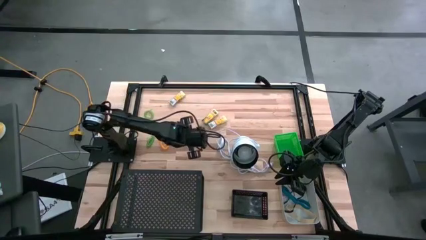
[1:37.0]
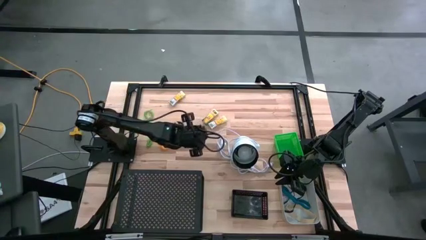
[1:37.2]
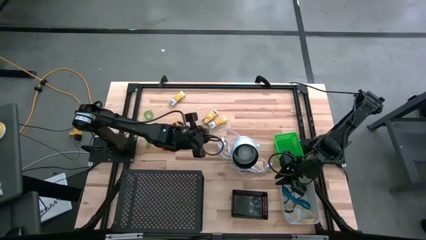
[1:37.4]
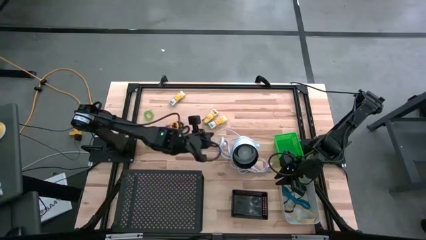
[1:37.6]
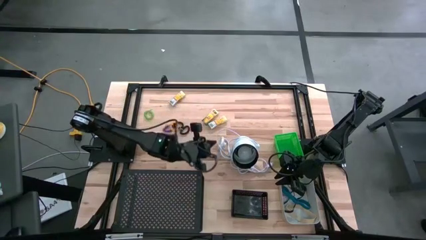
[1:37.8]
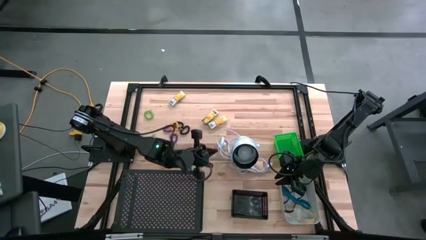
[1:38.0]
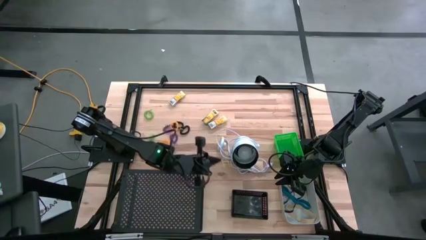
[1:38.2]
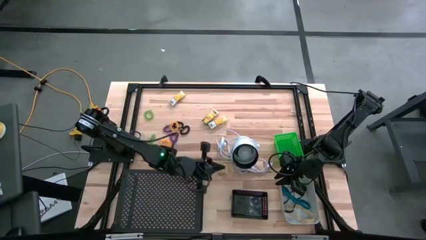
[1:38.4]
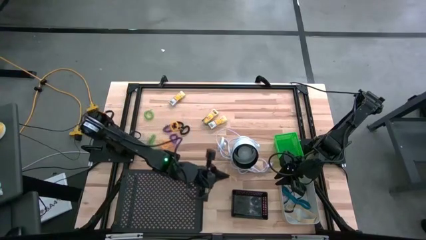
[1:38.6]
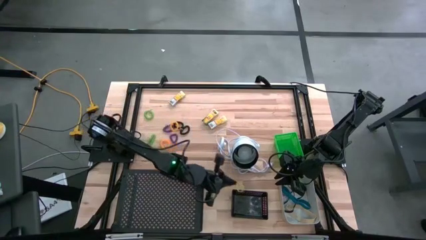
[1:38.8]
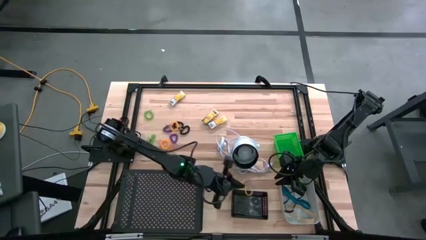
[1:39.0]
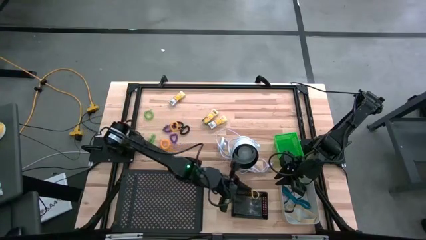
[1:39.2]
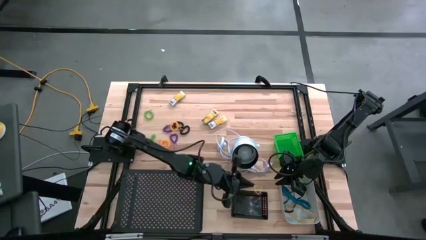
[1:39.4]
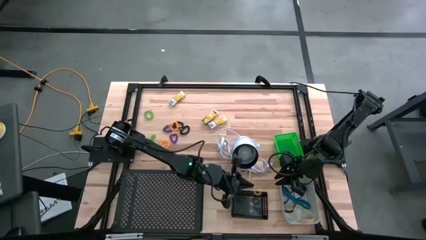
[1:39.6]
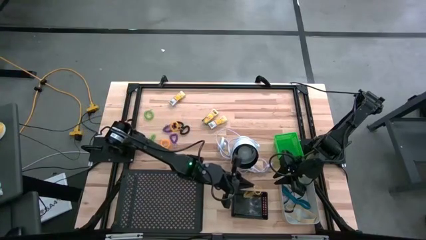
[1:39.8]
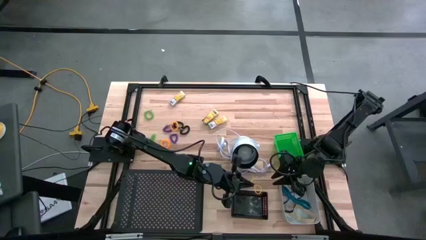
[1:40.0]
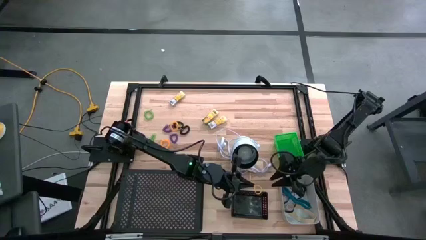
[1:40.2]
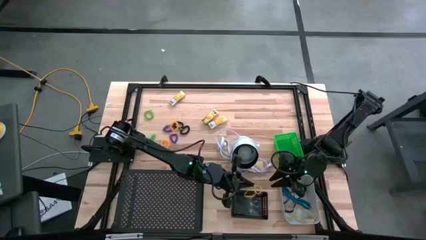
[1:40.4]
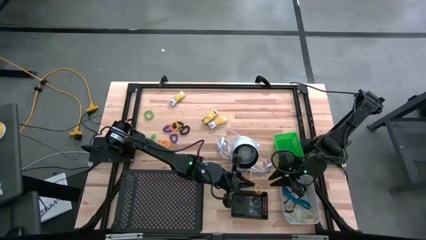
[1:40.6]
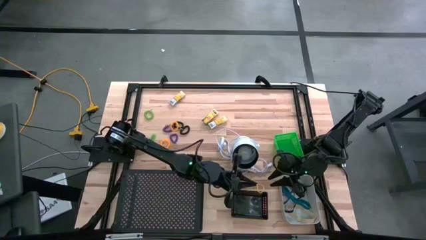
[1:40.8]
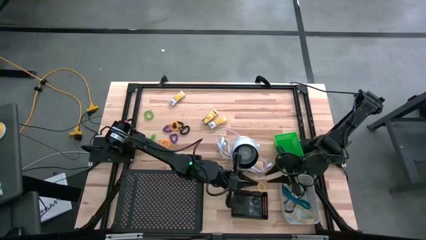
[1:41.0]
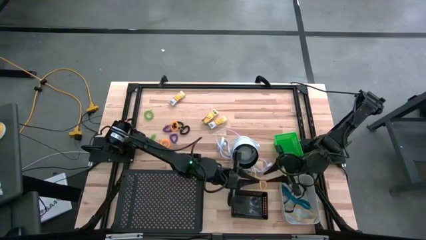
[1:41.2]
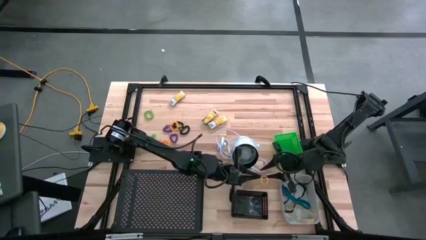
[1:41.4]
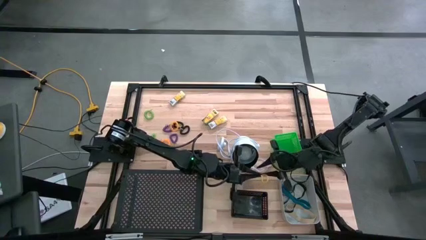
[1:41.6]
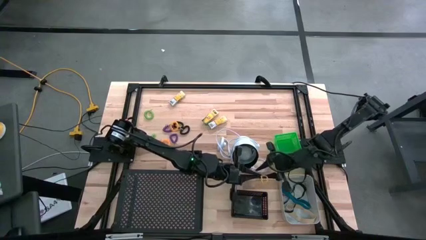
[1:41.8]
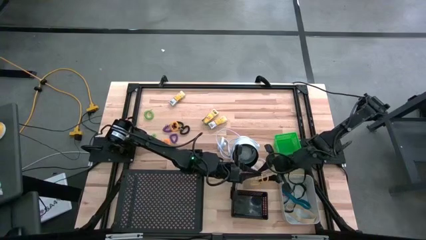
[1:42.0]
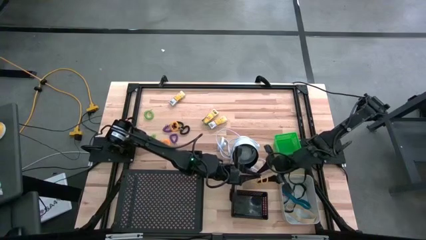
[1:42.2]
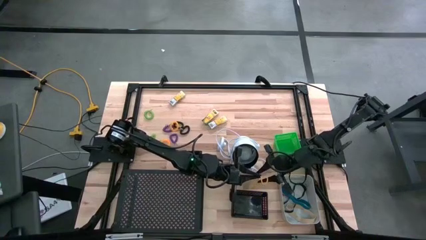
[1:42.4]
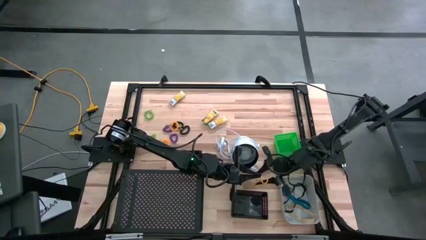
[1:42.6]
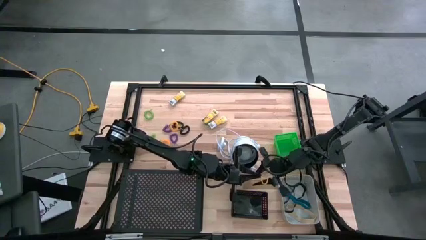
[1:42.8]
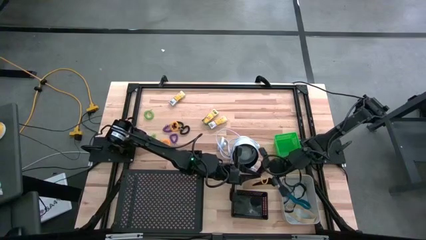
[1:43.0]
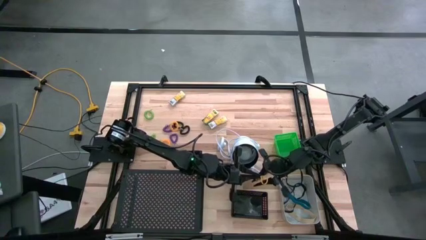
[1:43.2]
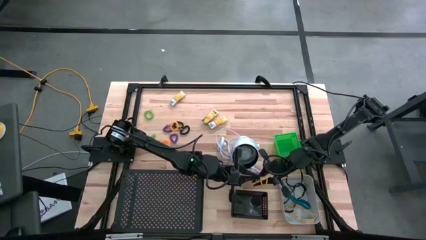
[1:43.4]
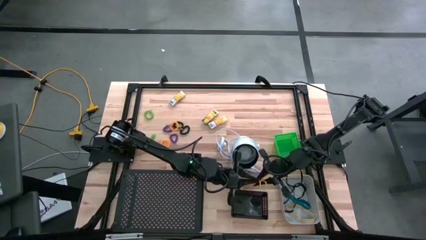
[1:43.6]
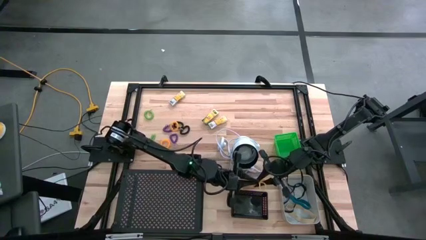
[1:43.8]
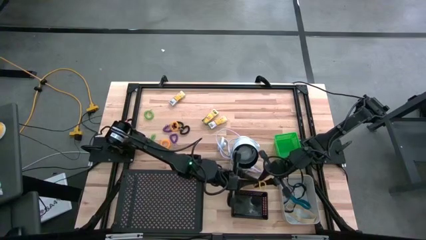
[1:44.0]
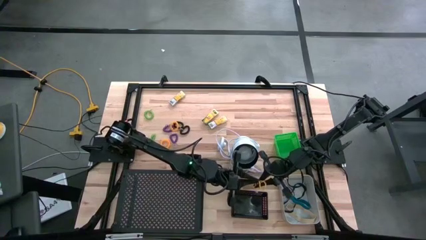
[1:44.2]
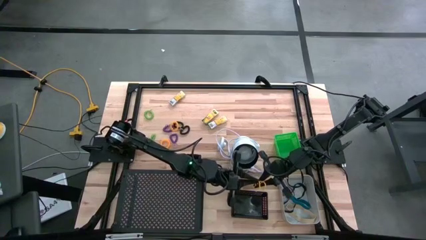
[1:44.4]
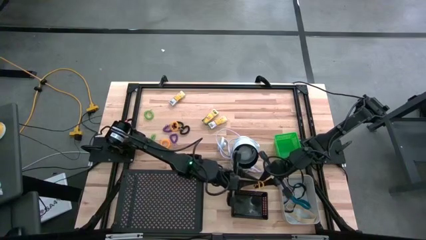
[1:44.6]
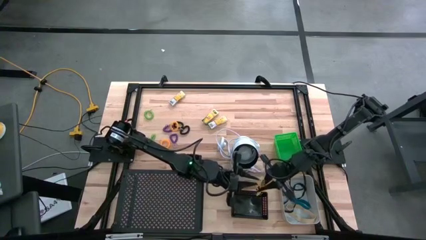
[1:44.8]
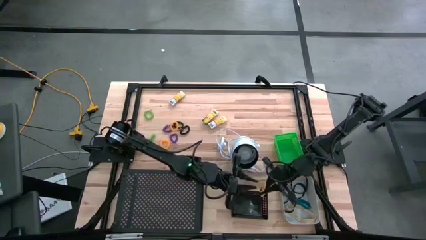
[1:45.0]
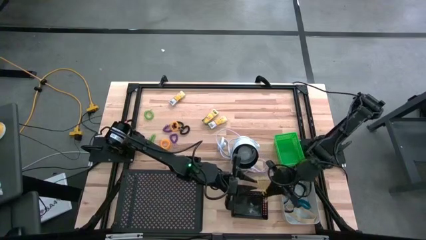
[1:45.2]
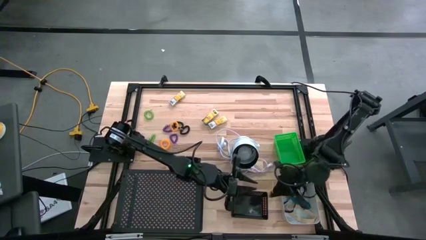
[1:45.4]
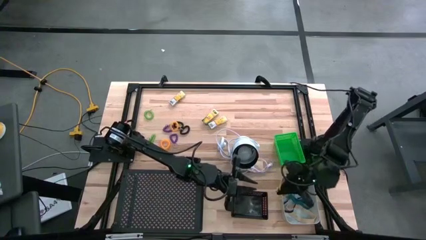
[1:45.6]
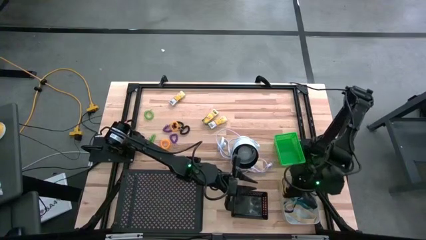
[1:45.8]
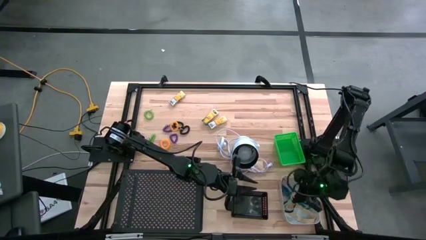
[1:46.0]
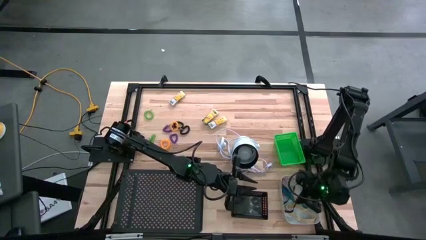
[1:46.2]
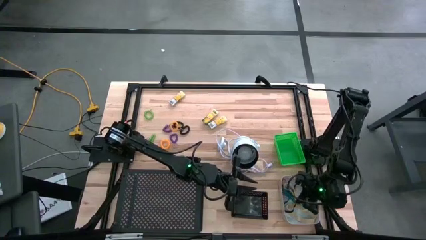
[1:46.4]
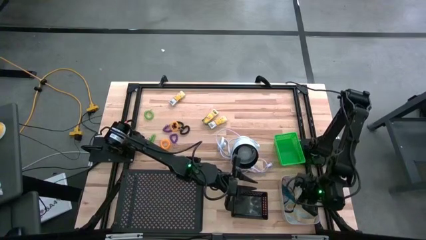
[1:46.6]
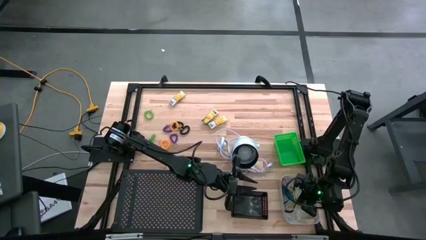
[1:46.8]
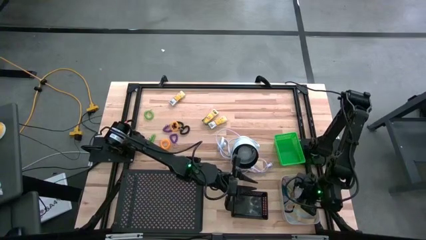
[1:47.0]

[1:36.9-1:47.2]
Task: Pick & Place Office Desk Supplies
Put the yellow rubberband into the gray bin

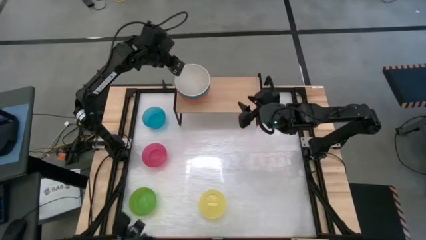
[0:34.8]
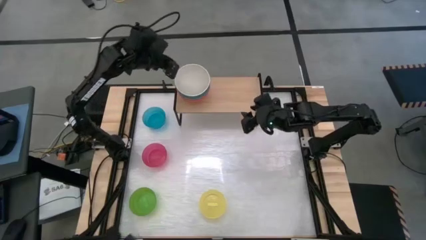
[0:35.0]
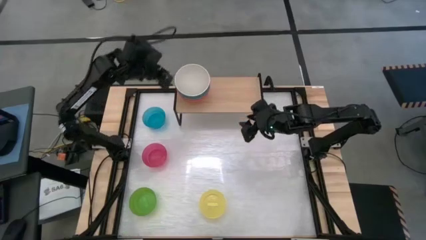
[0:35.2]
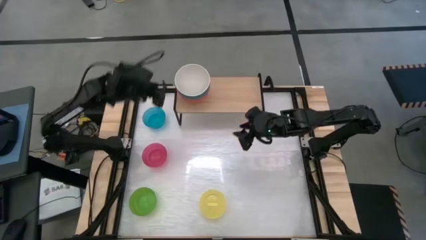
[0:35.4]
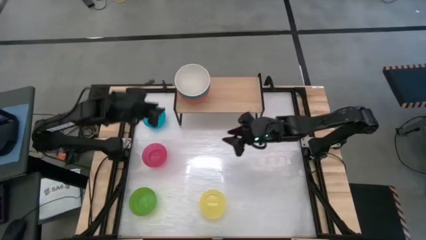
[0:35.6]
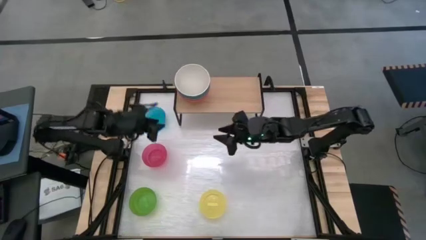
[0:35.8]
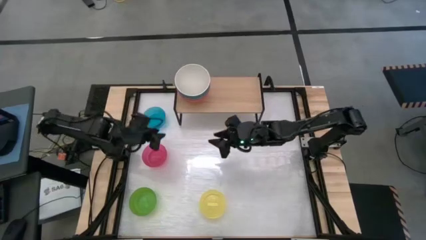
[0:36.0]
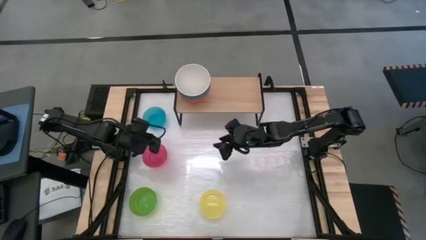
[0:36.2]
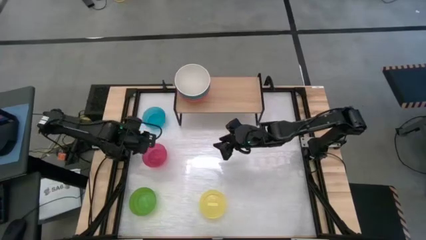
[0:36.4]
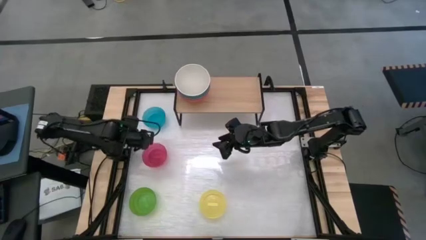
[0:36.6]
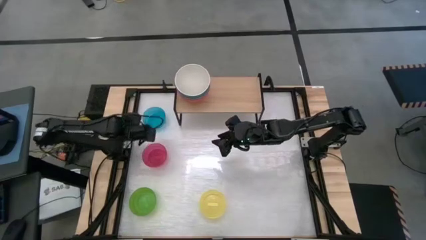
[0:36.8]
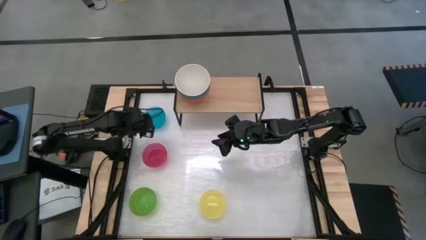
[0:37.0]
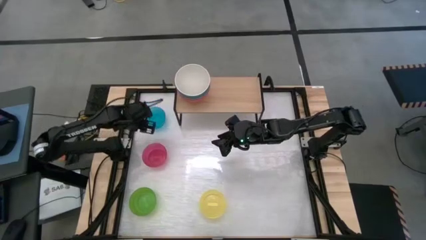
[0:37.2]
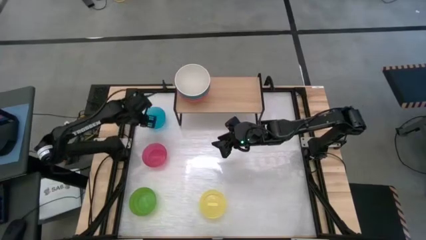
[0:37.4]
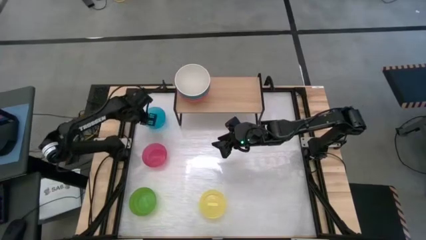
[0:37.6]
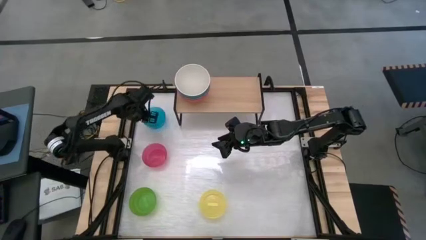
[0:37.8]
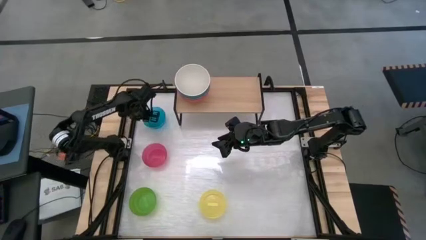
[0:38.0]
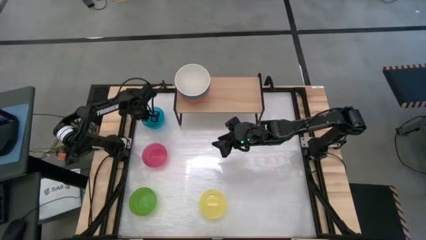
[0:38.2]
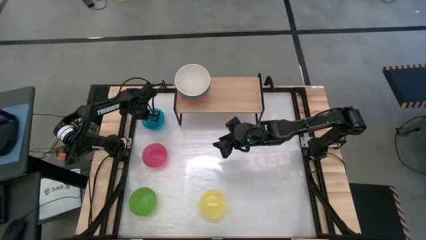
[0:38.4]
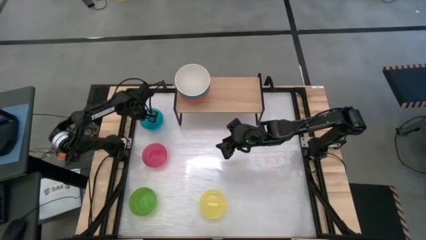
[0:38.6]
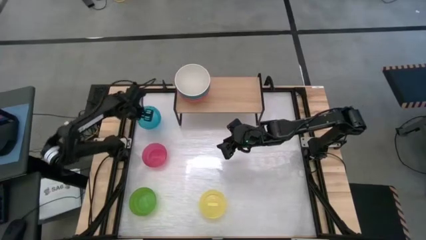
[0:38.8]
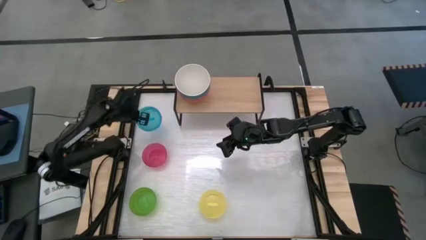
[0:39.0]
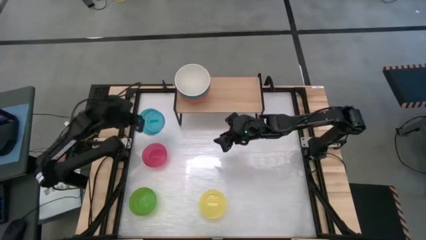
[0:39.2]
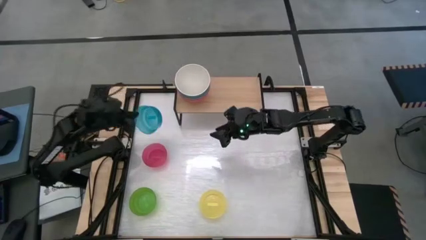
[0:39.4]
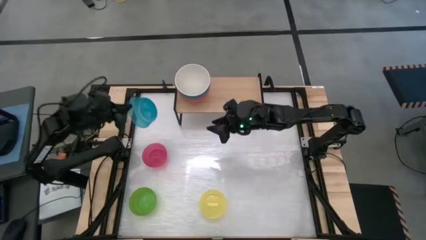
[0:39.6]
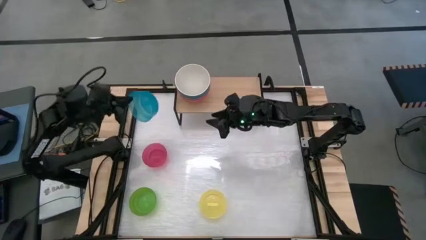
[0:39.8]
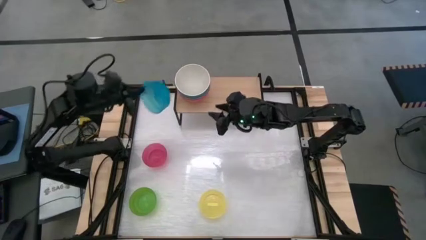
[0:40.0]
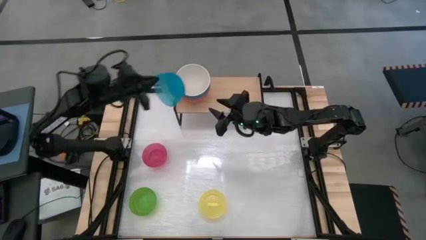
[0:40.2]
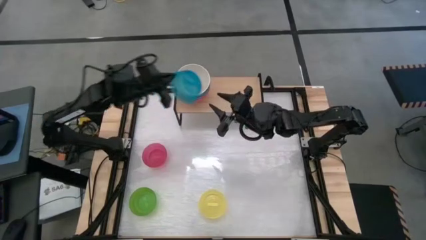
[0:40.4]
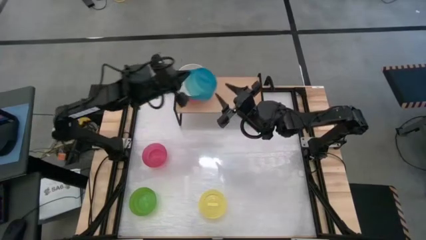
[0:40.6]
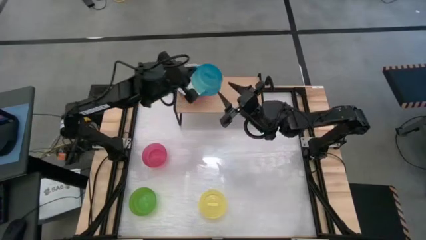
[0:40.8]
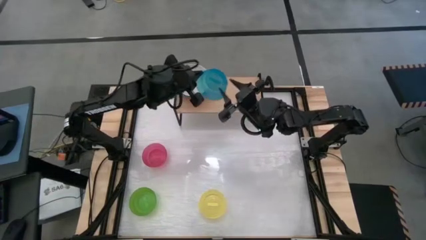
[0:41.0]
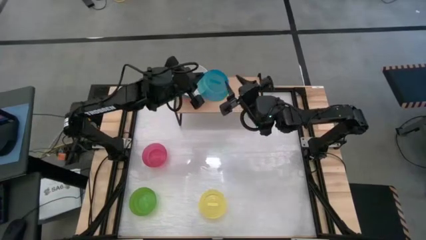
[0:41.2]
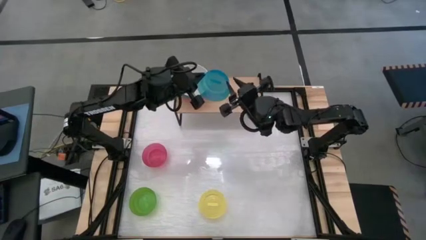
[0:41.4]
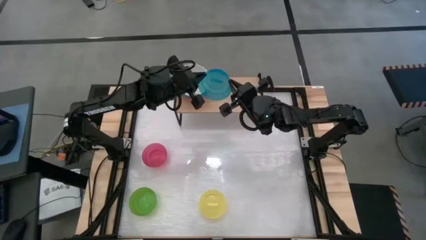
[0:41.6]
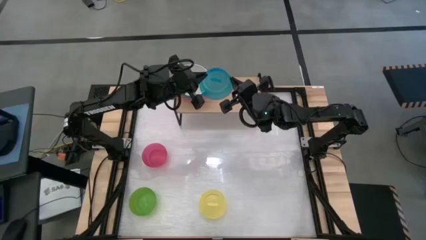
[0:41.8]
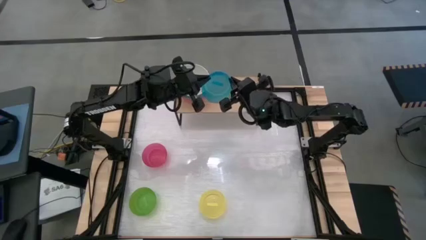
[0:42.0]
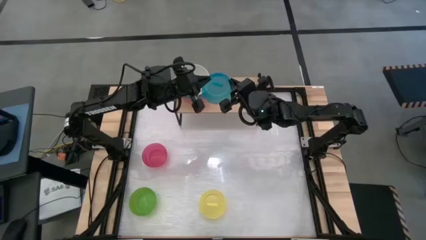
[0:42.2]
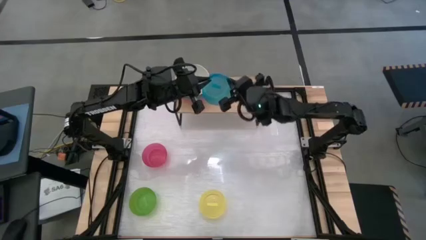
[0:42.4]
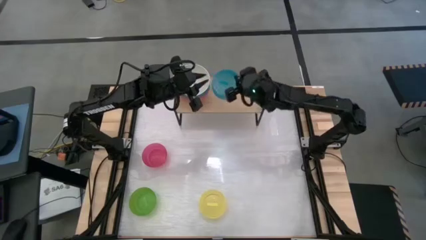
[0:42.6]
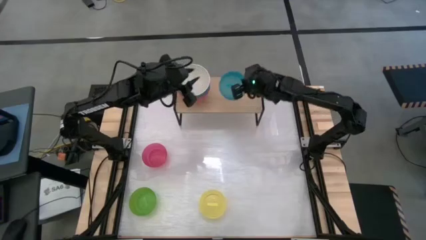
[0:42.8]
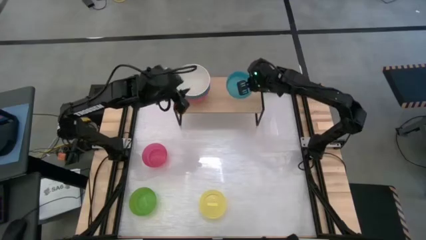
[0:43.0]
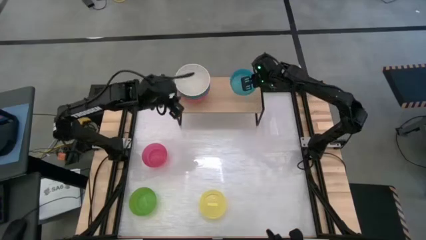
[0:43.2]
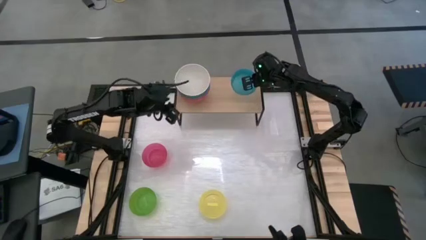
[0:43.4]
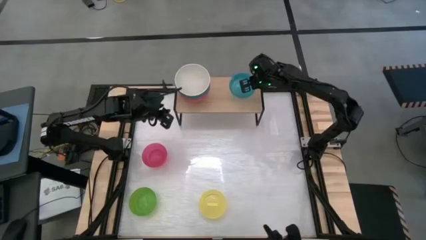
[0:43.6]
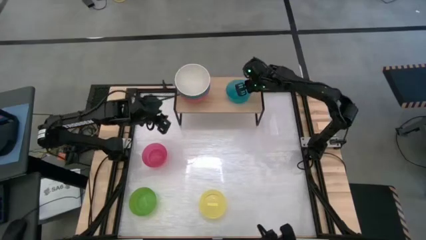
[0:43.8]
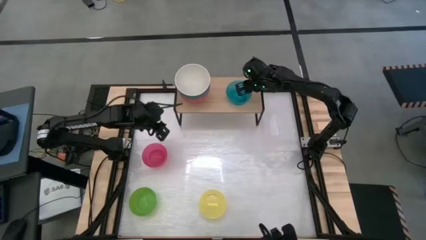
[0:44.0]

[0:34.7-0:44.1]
Task: Place and stack bowls onto a shelf
Put the light blue bowl on the shelf
